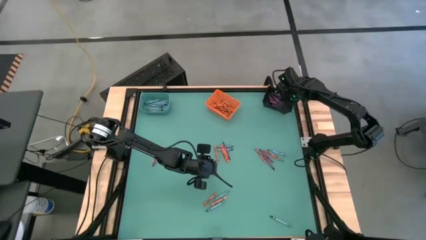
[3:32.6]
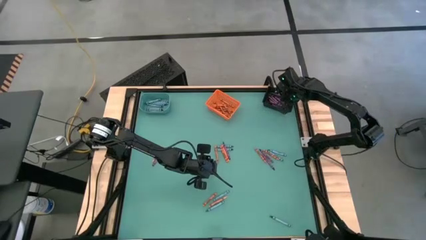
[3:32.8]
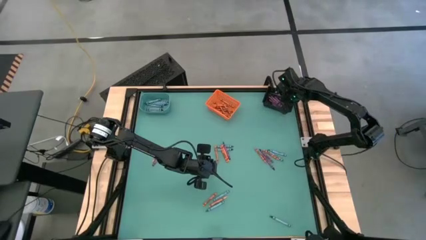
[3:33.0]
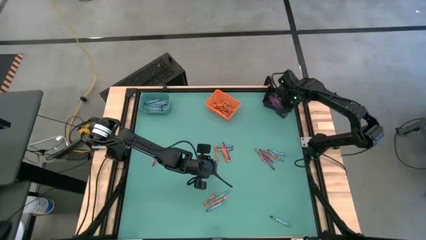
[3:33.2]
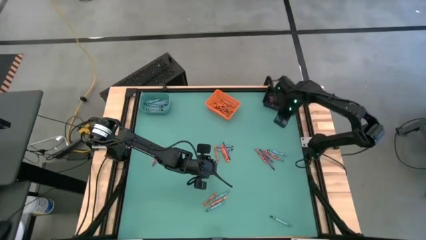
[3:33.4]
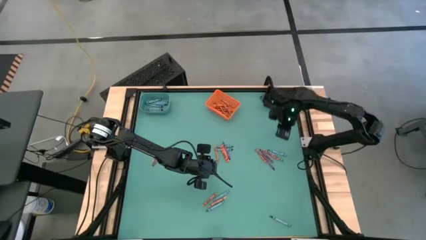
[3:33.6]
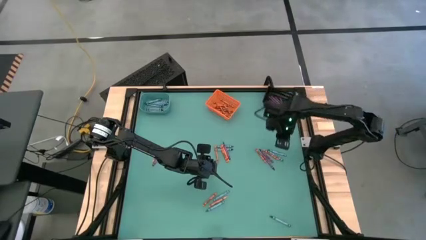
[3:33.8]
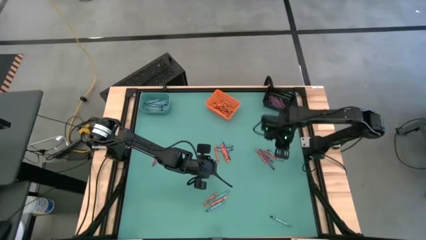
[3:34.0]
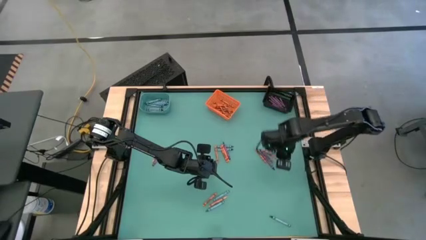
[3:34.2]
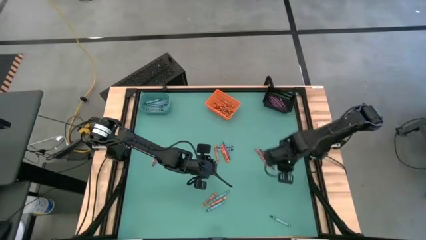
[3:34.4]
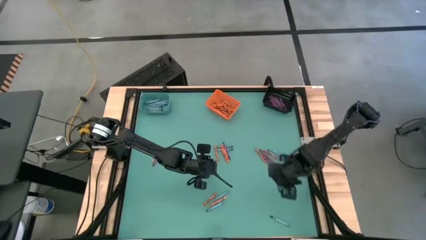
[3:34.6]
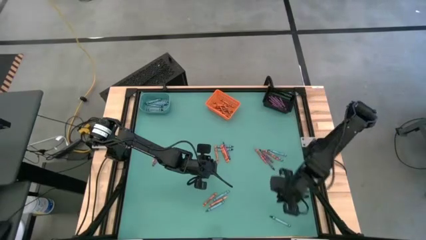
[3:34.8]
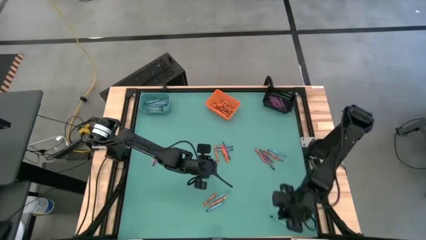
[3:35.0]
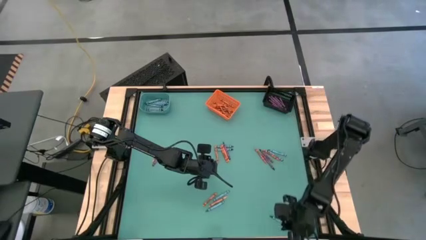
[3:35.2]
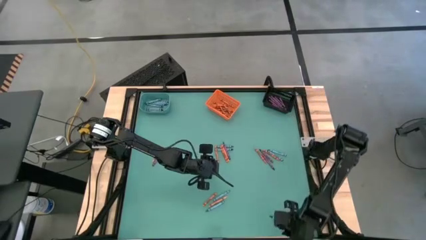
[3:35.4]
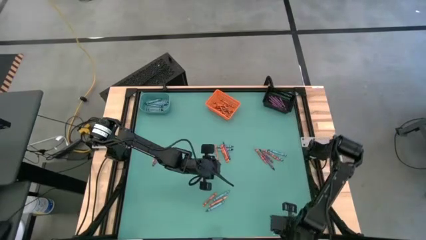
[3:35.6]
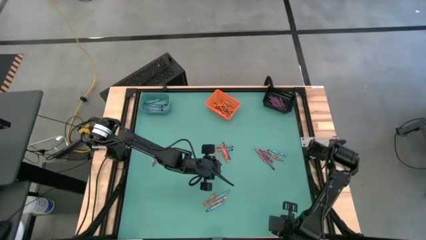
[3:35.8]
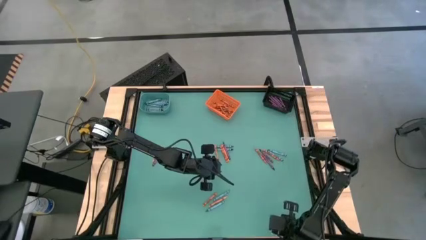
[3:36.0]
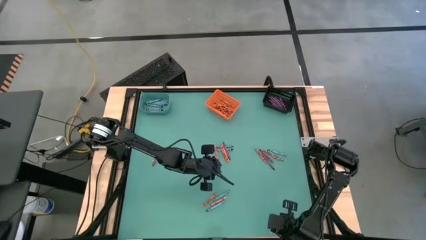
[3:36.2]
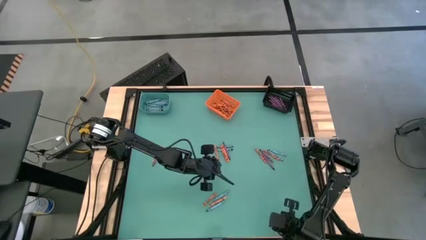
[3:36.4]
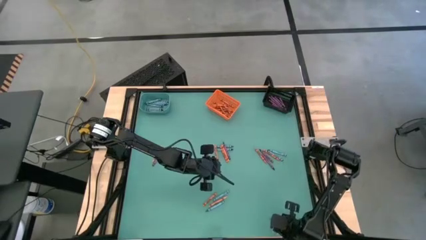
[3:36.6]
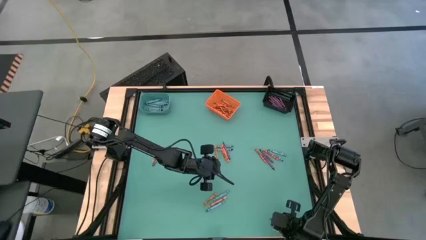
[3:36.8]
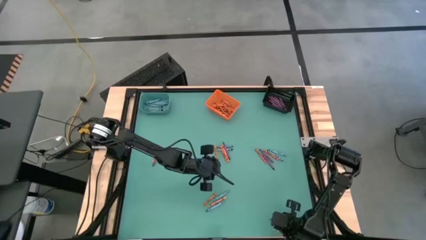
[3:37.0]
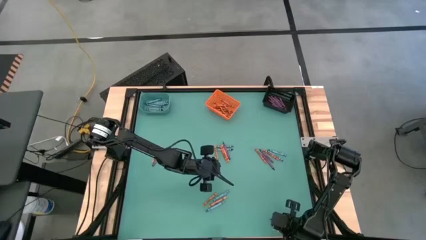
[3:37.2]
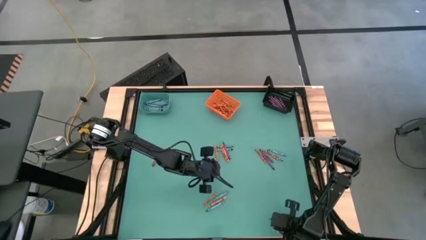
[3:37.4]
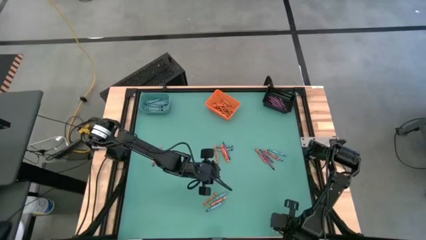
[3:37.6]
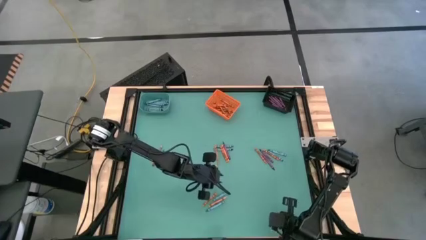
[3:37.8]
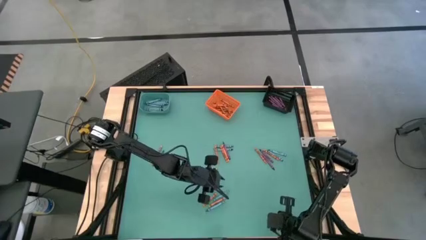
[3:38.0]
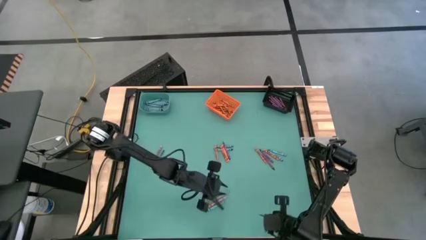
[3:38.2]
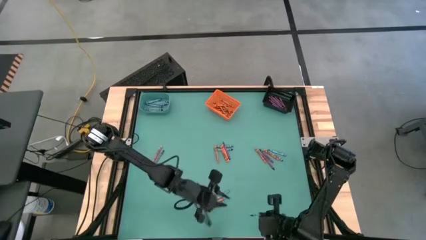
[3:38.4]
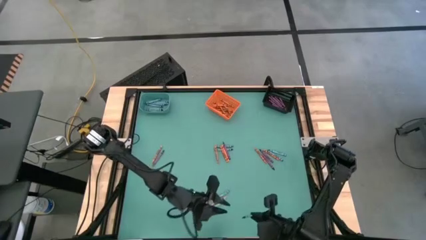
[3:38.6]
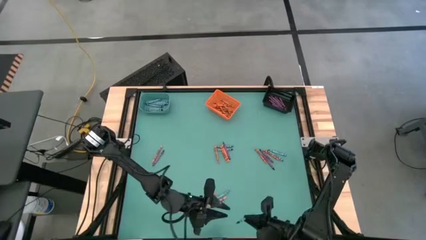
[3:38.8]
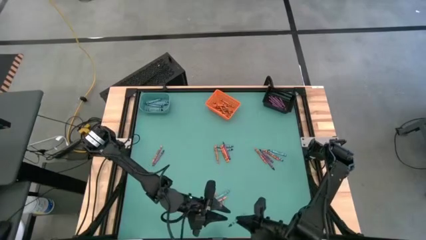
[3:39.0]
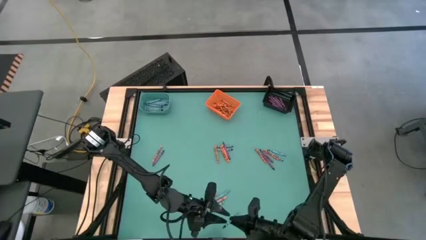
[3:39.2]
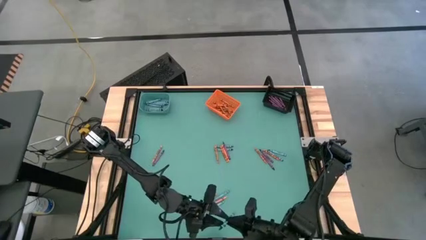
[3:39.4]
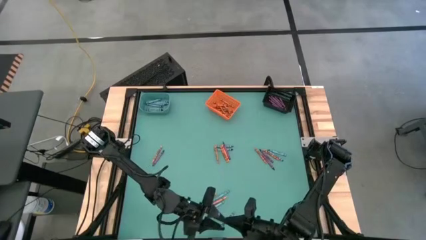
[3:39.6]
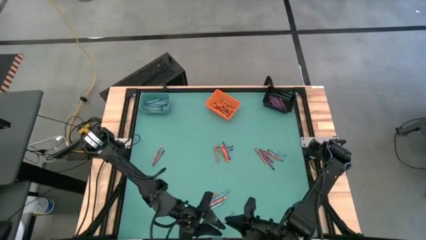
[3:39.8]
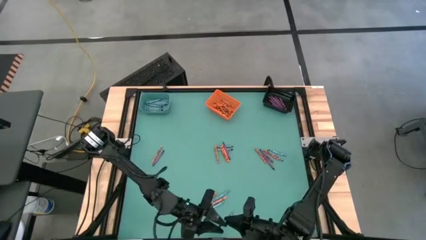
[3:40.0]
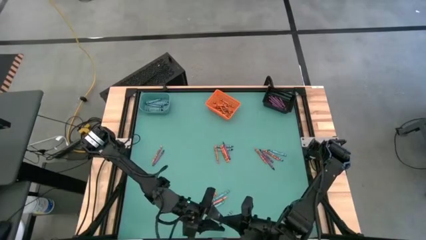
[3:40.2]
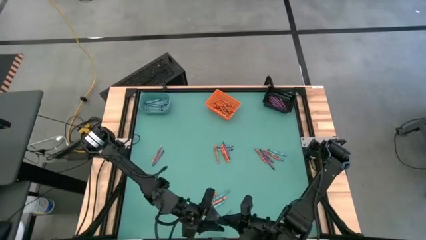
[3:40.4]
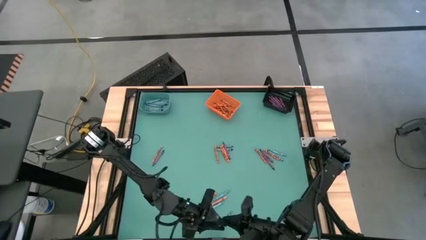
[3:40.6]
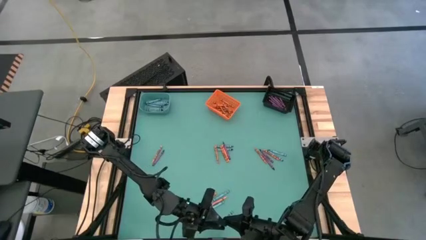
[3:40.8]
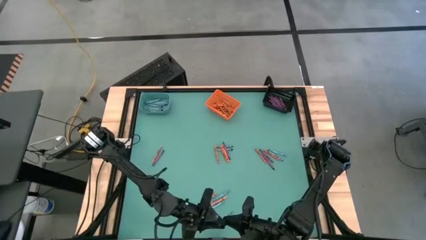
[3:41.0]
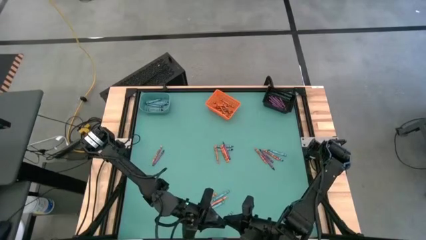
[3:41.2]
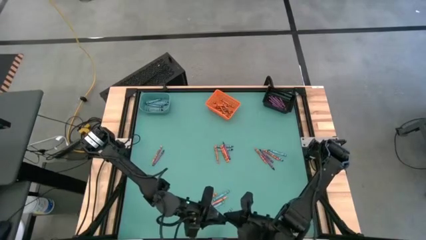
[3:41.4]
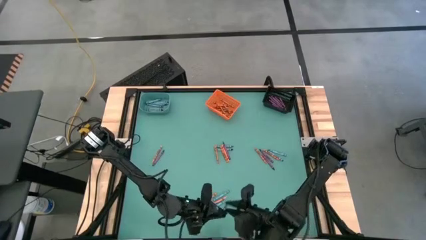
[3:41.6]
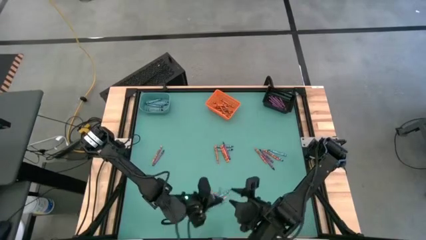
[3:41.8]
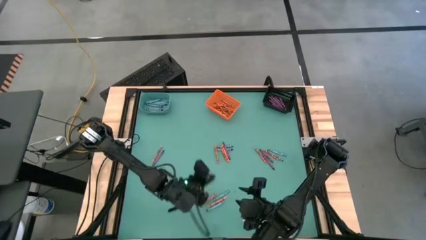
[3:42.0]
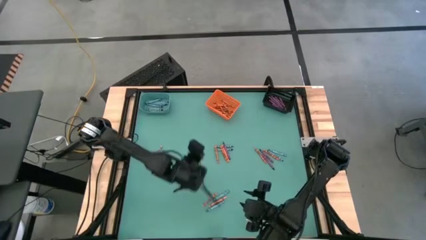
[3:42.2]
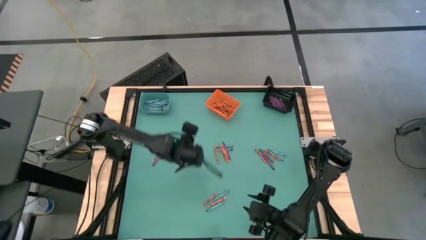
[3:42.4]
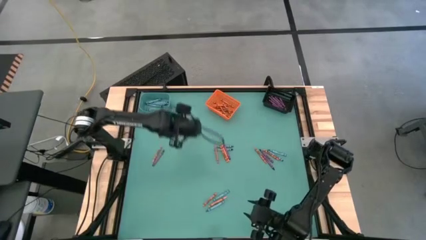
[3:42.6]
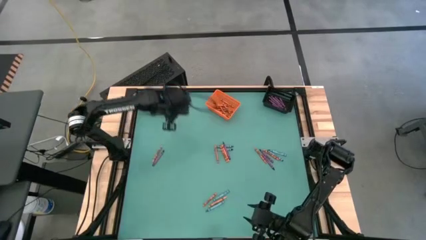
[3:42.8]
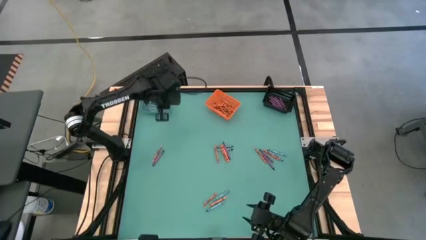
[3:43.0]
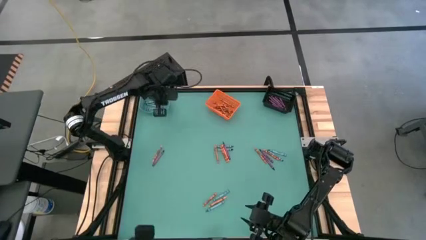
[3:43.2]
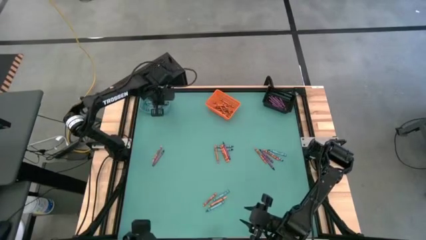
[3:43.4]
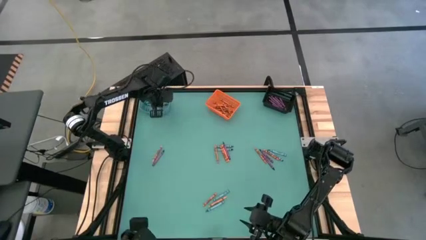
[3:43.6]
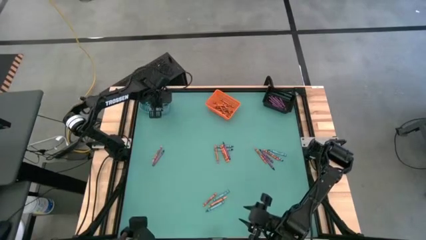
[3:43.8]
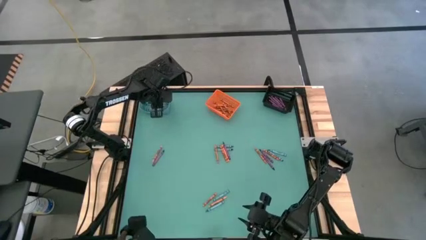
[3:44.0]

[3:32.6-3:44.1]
Task: Sort crayons
Put the blue crayon into the blue bin

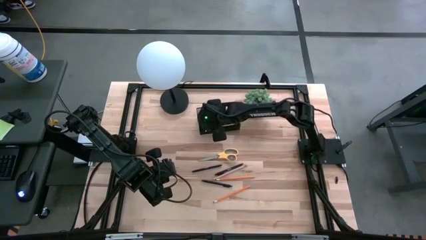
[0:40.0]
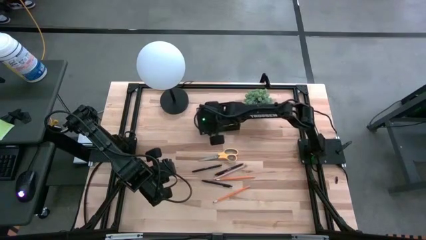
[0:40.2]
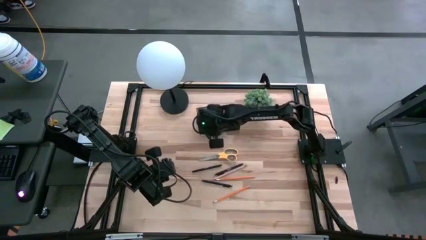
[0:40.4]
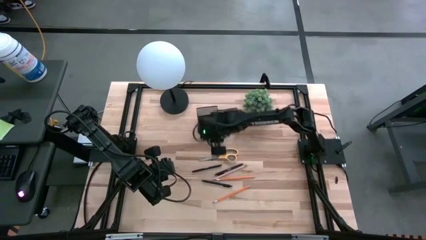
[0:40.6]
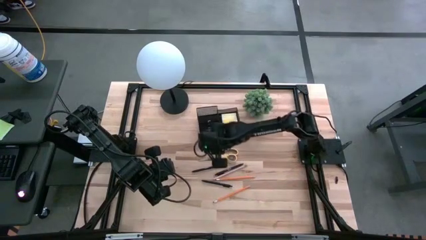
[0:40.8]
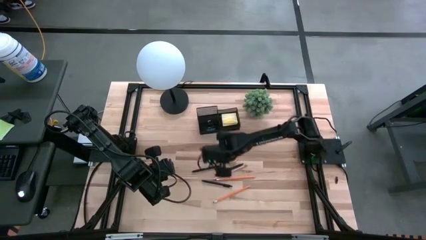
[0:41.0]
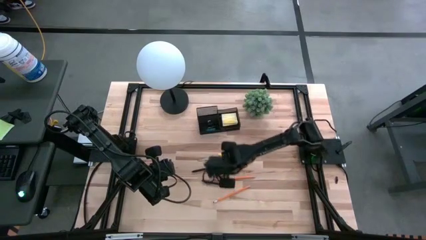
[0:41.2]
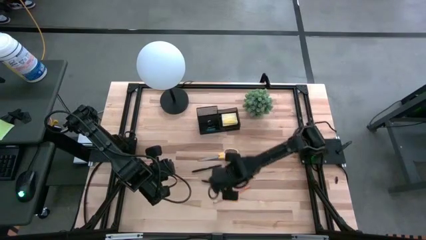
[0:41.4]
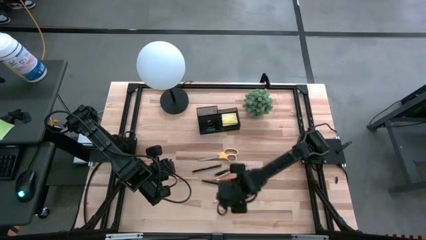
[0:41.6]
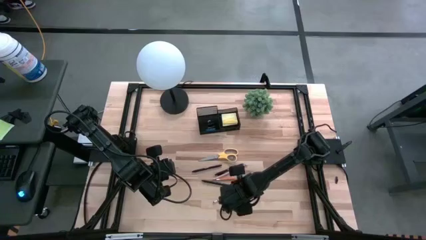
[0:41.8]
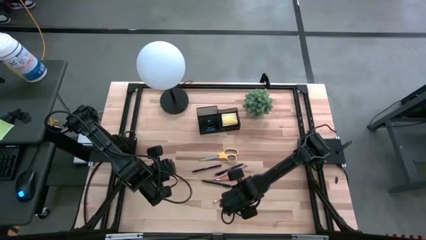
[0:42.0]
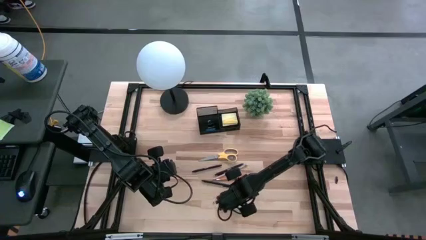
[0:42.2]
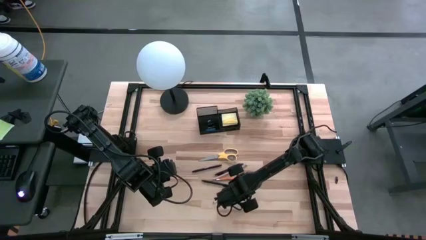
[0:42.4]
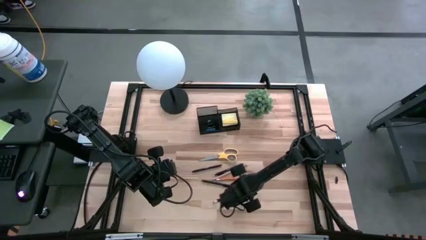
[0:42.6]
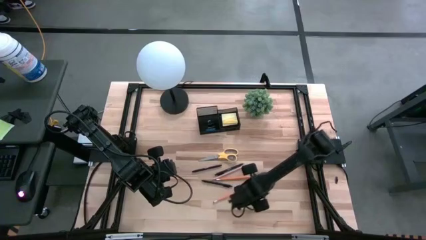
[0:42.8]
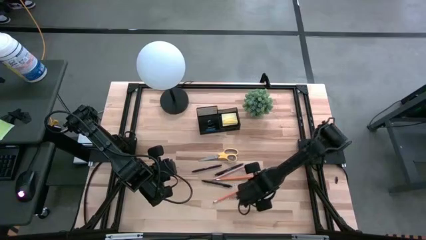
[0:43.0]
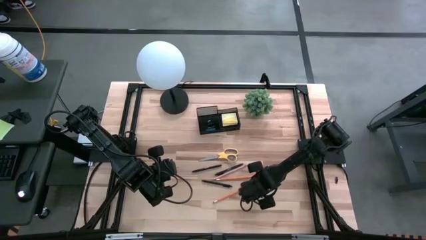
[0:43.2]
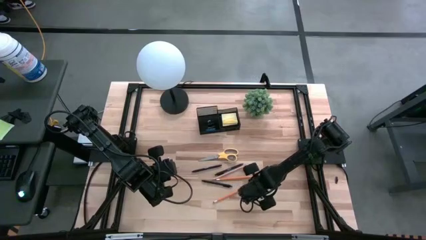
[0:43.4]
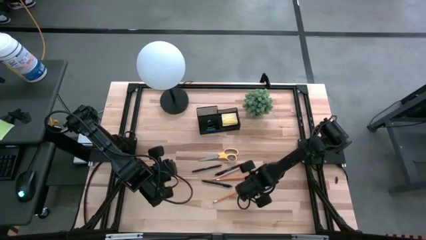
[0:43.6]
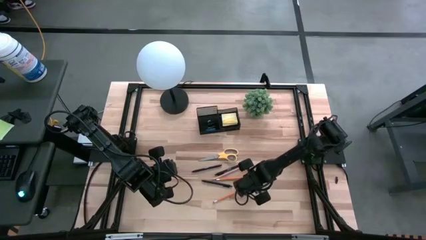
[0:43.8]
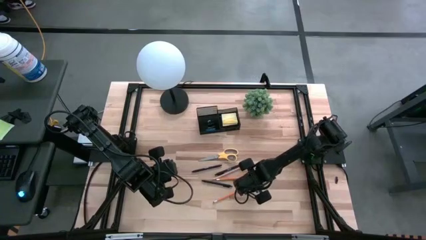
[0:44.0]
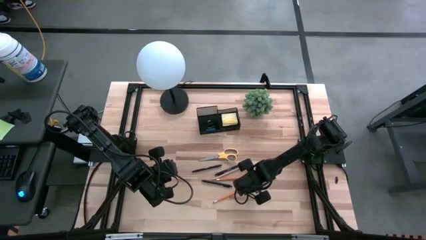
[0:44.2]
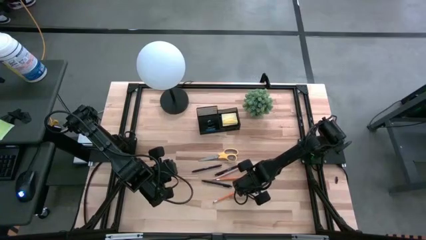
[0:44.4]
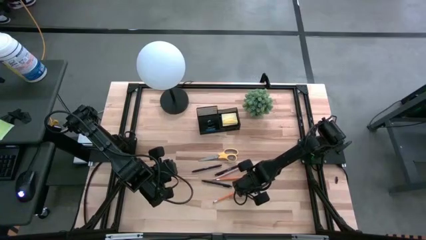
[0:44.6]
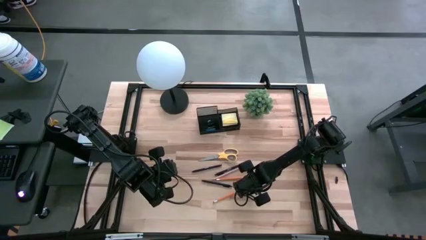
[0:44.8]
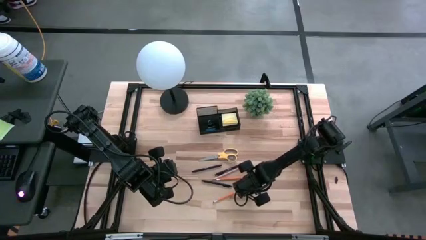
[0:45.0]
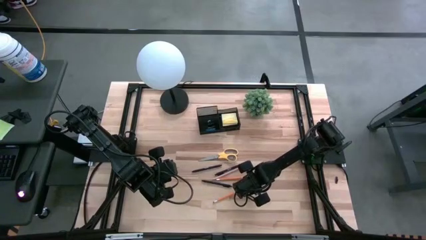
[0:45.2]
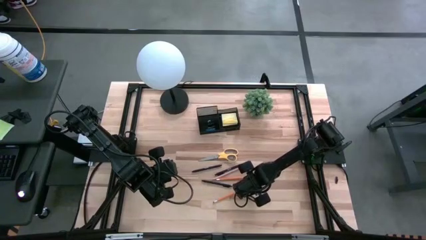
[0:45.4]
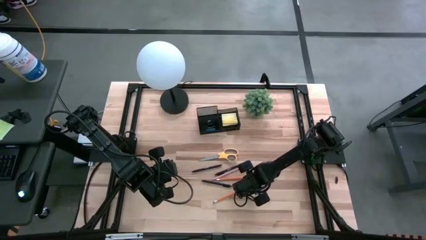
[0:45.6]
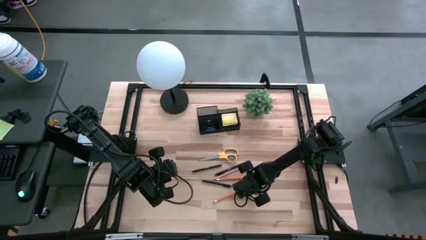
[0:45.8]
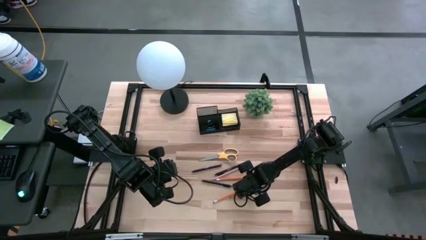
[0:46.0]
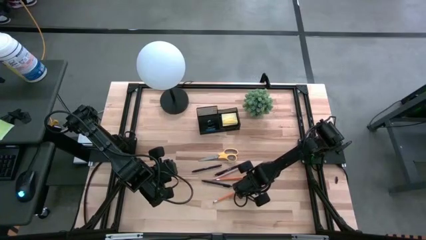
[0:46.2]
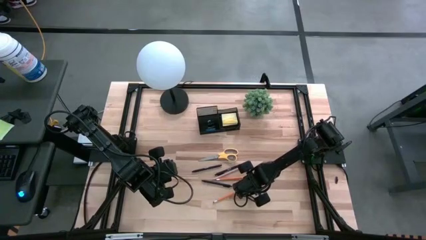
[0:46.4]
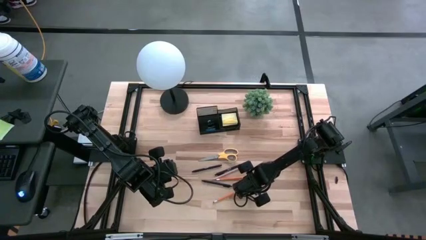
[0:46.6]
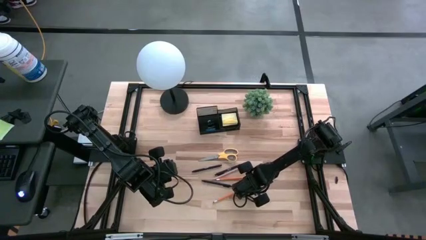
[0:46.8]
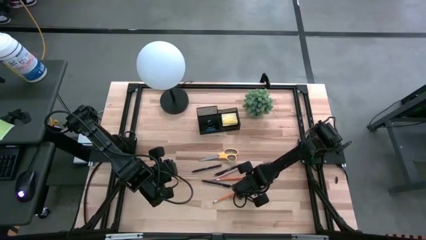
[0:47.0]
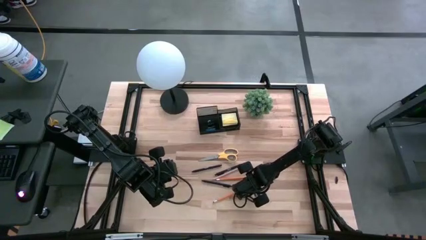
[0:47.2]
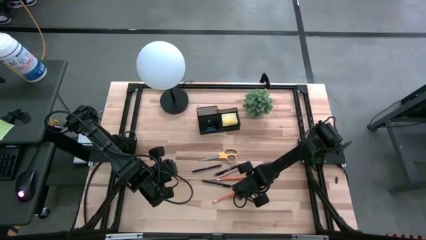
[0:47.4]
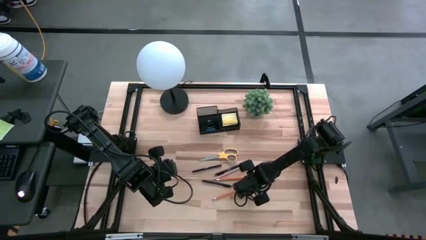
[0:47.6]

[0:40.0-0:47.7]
Task: Pick and place office supplies into organizer
Put the bottom orange pencil into the desk organizer
